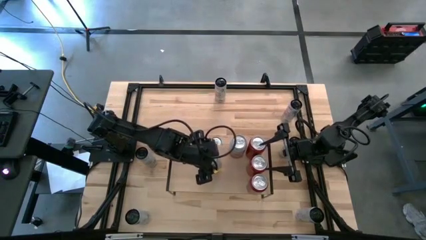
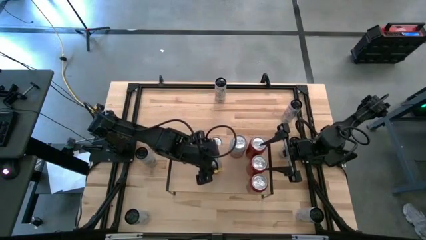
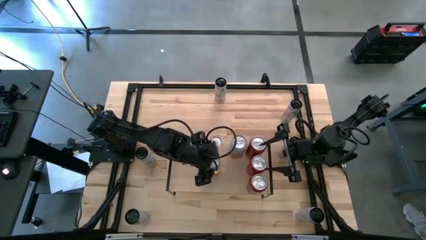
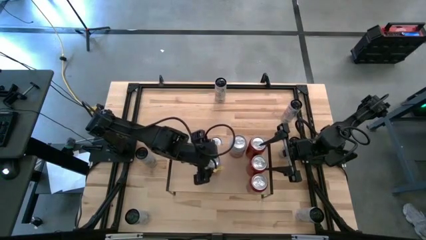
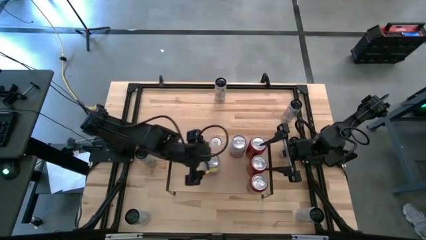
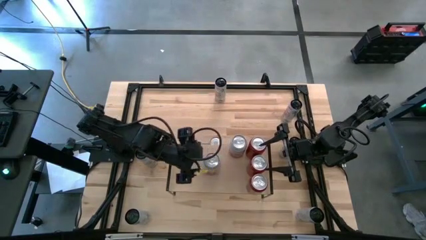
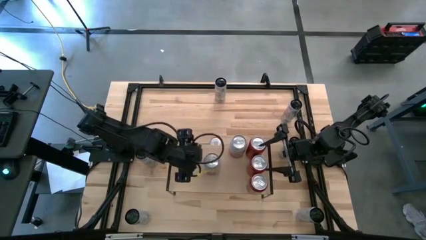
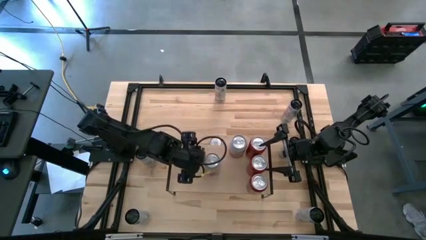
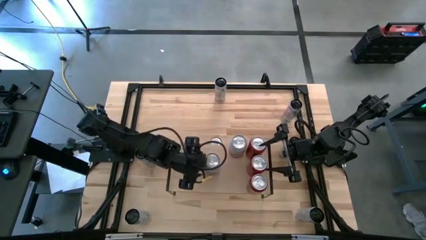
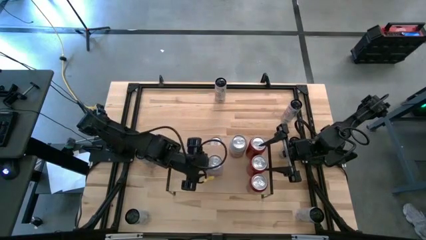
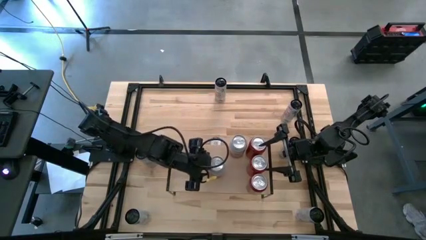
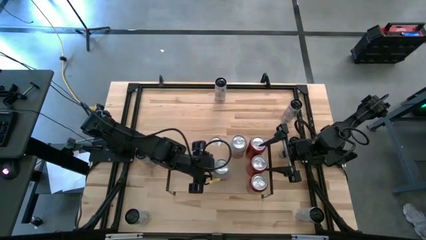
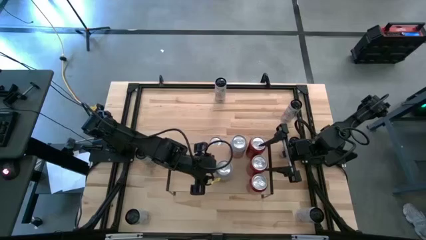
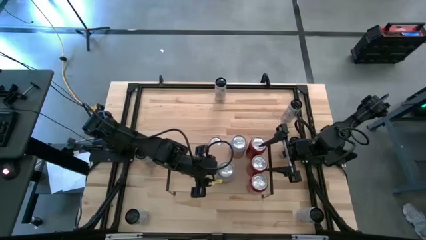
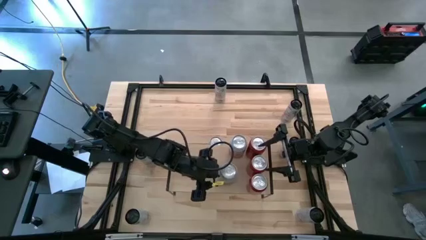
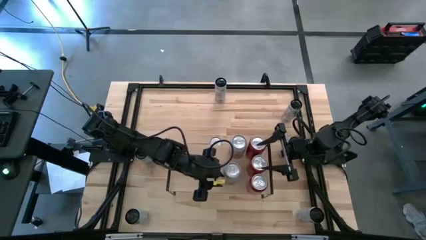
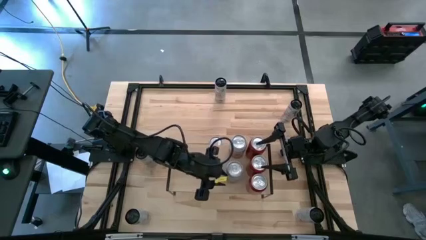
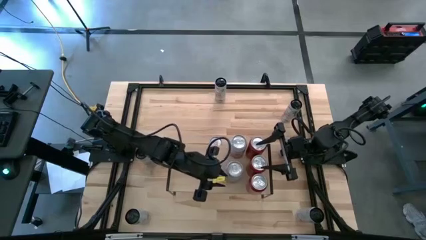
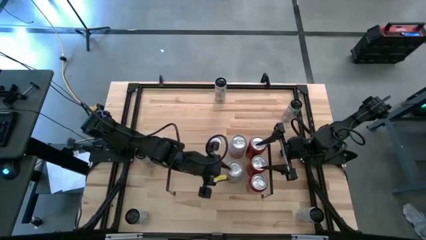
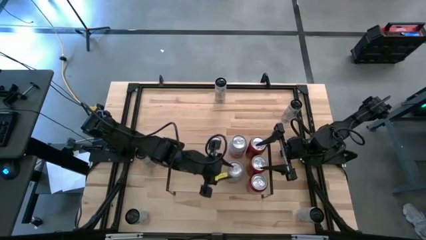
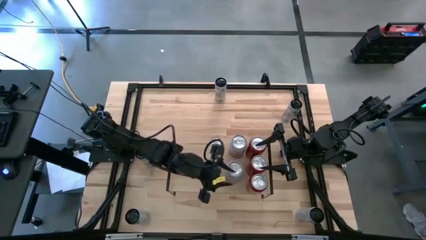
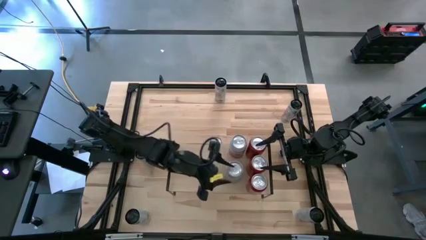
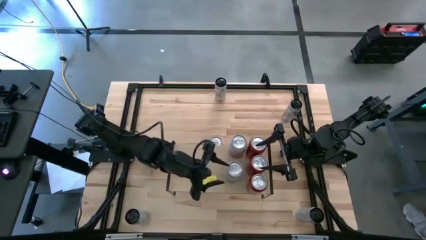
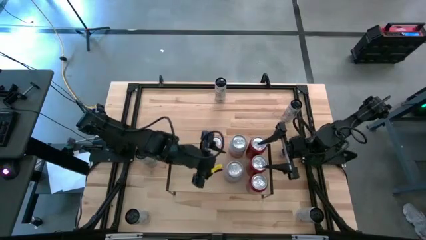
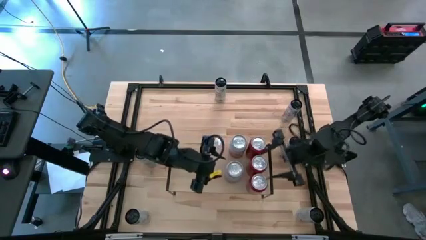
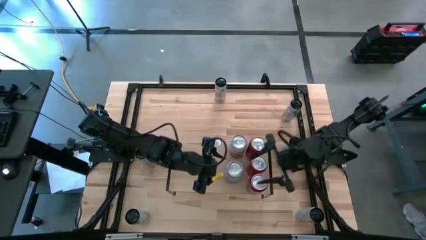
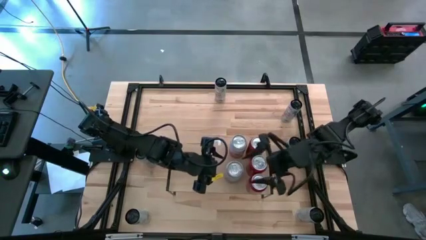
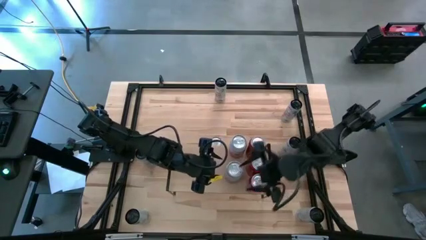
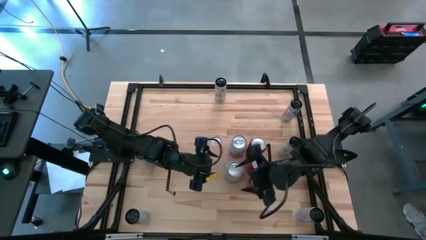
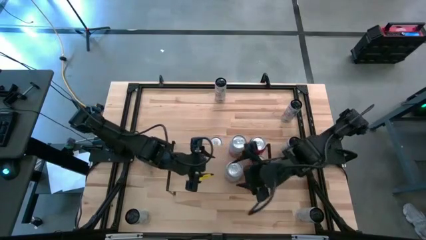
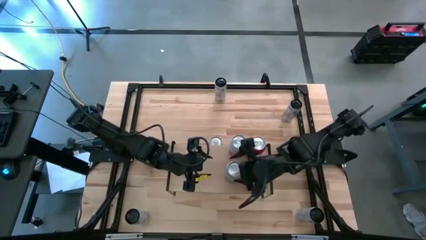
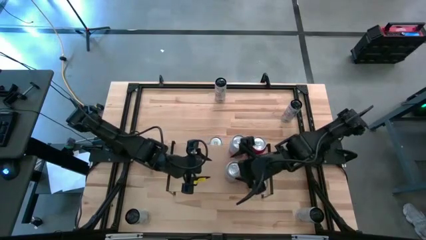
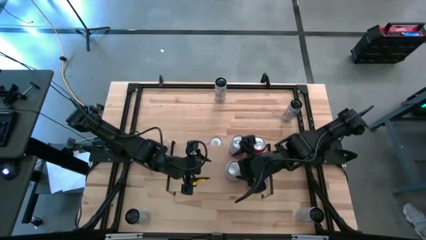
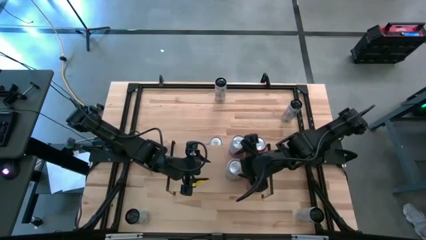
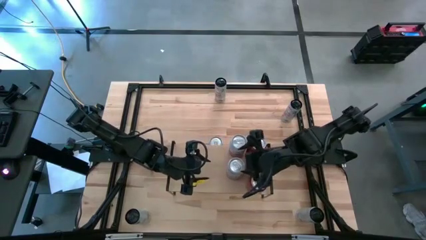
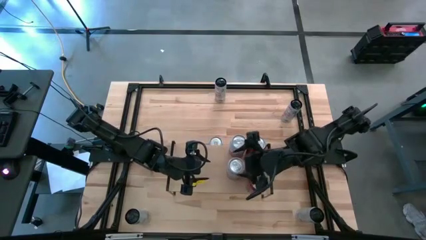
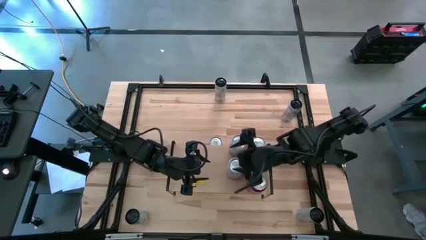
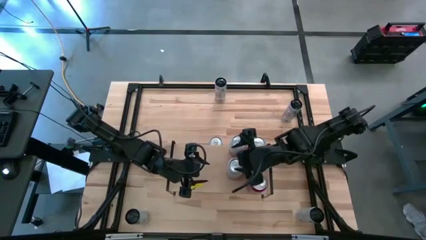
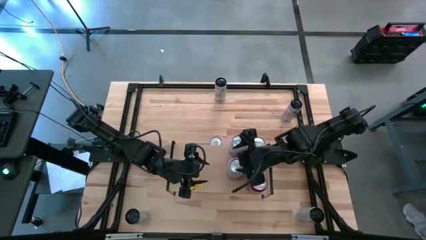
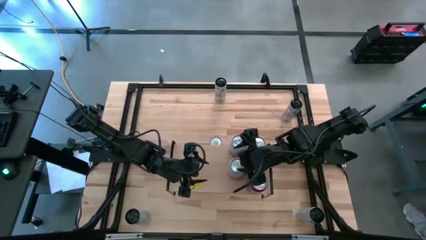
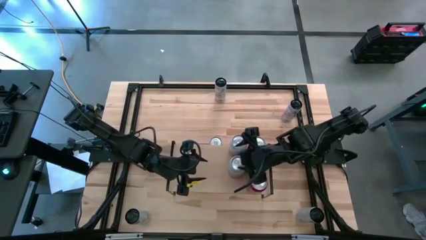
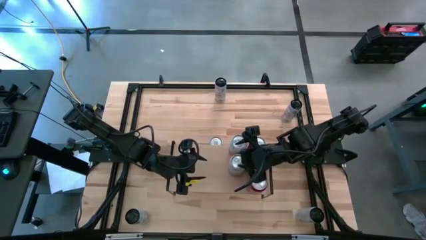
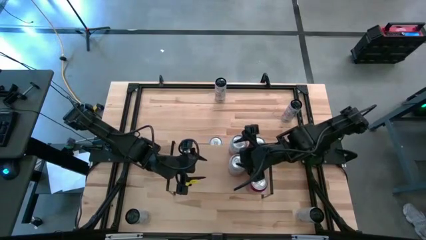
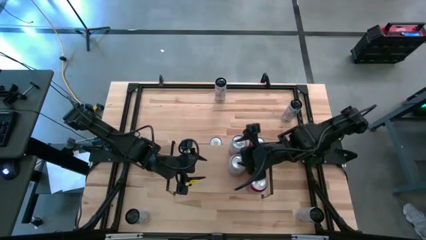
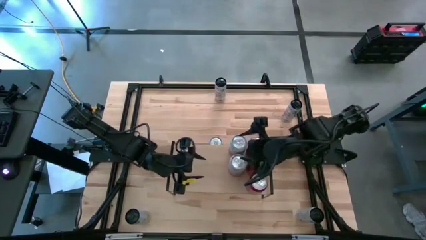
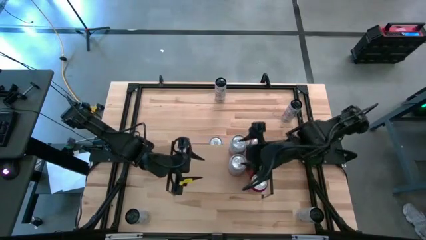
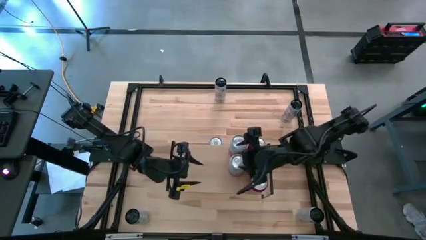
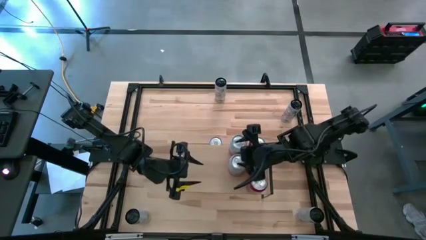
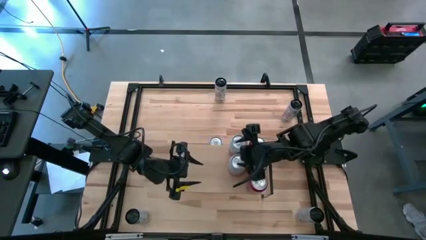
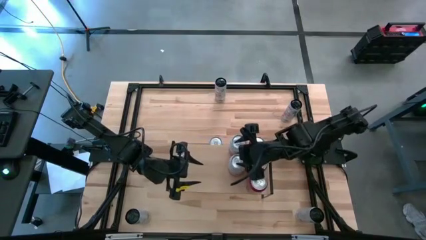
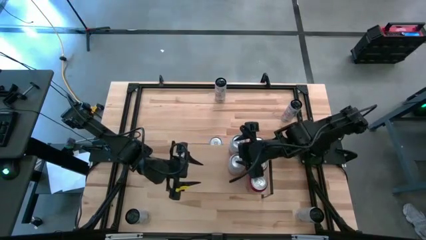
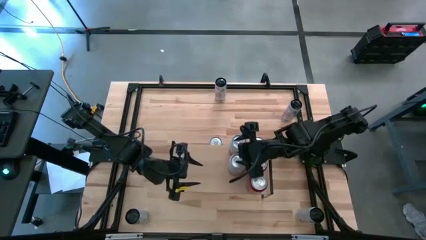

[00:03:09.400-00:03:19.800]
Task: Place canned beverage on shelf
Put the right pink-white soda can on the shelf aligned with the other pink-white soda cans
